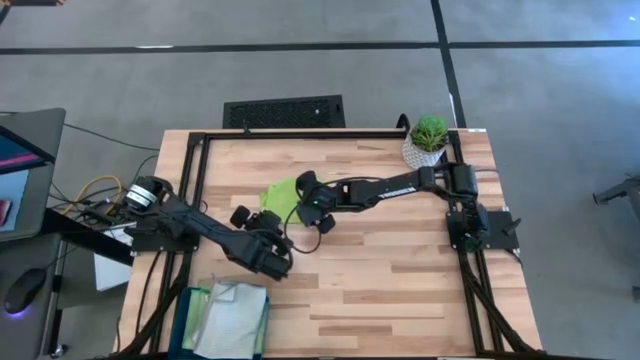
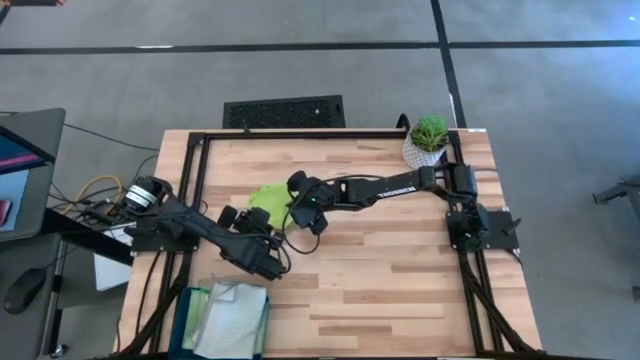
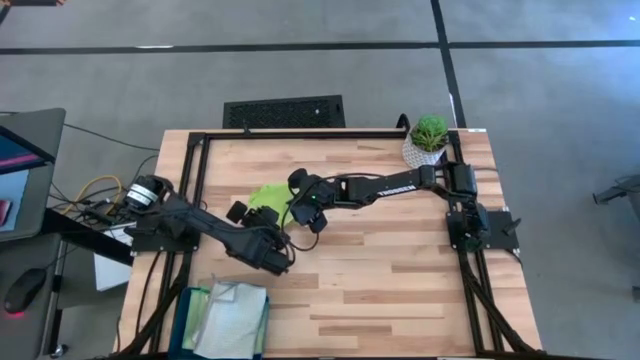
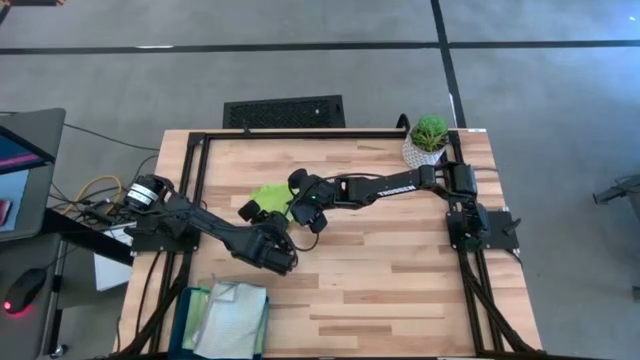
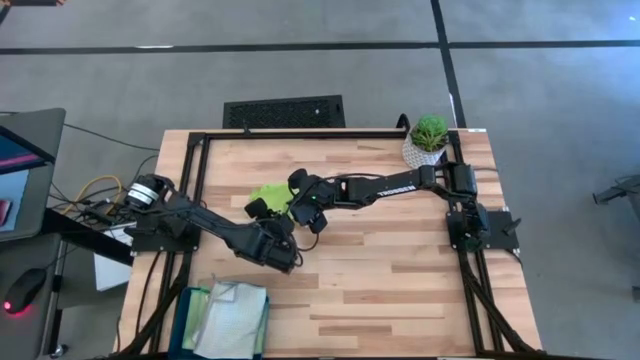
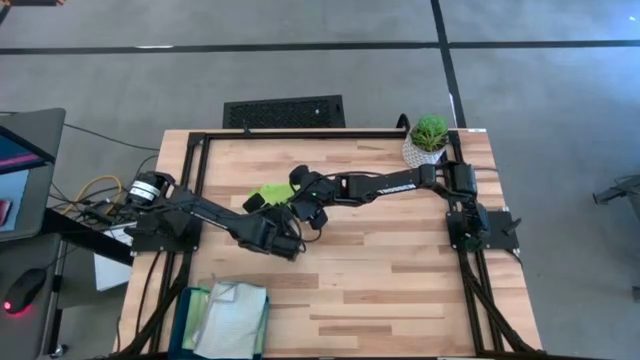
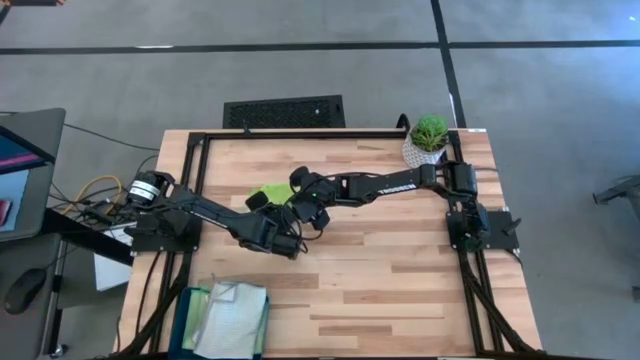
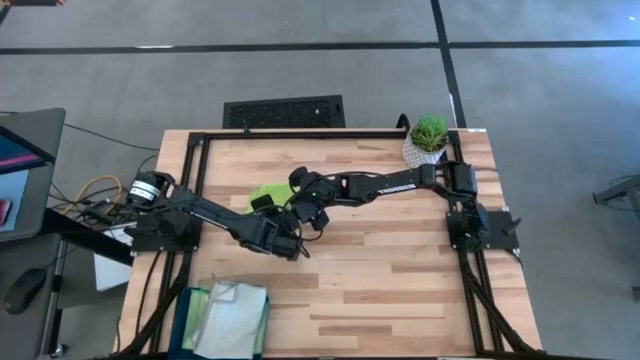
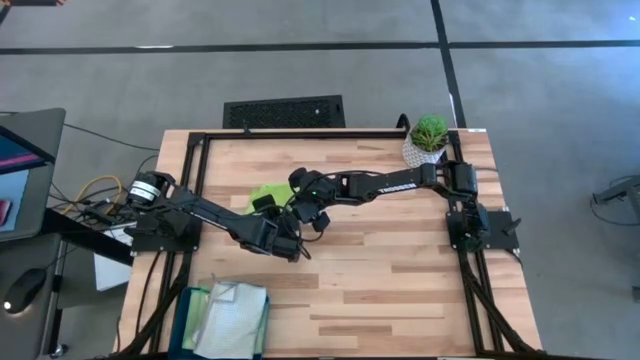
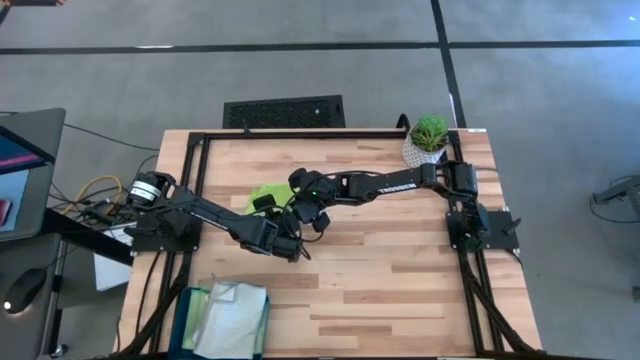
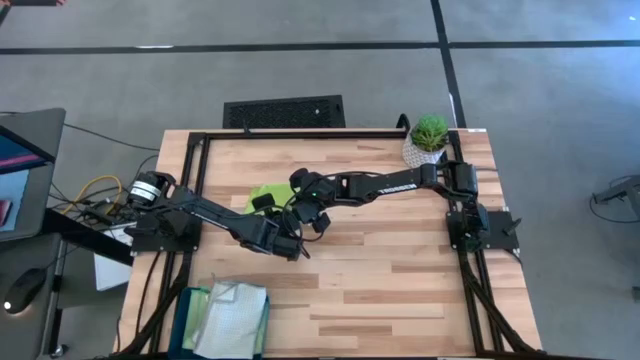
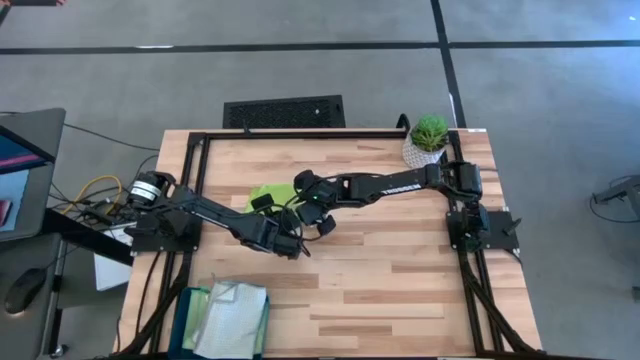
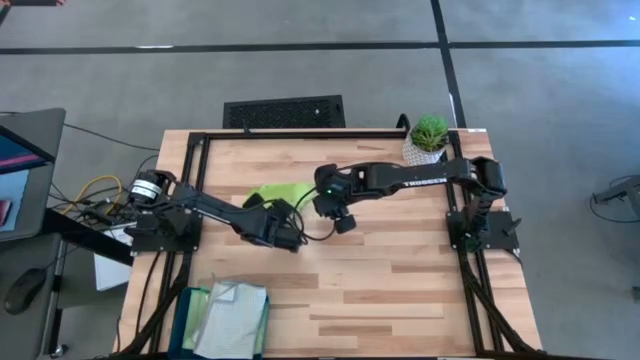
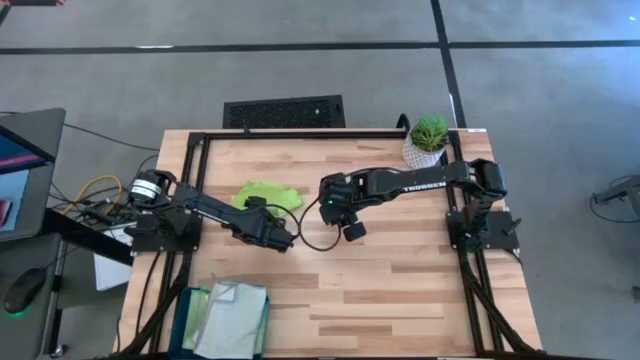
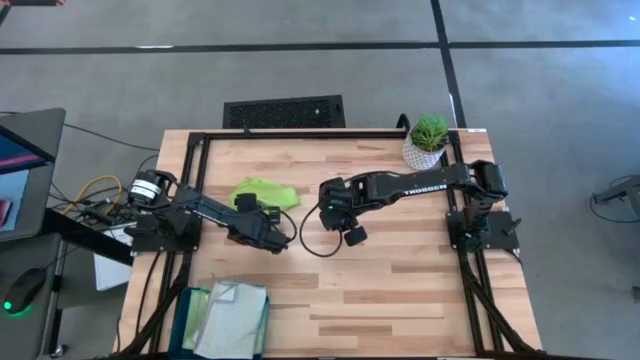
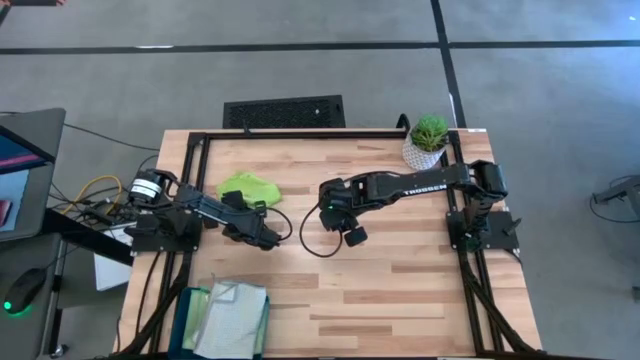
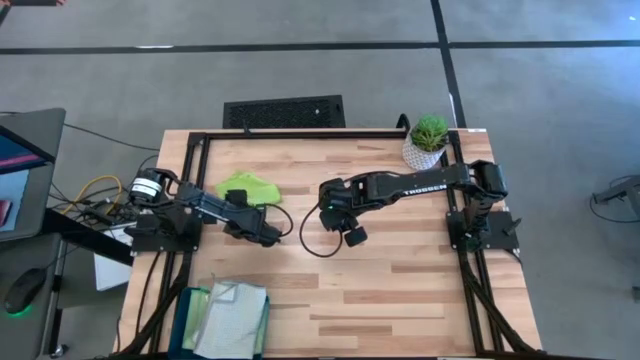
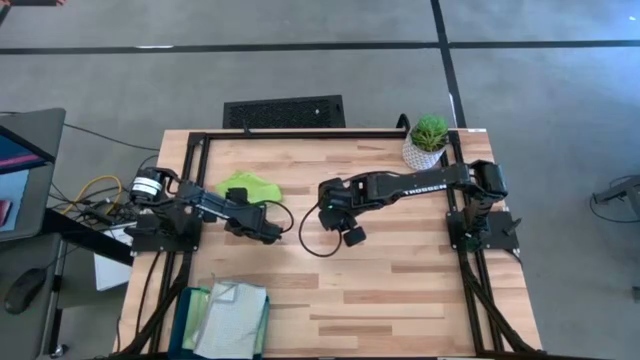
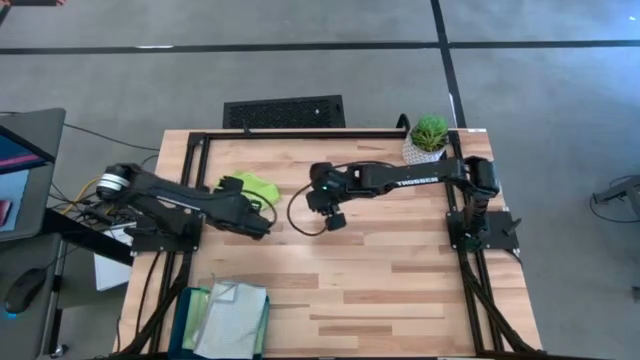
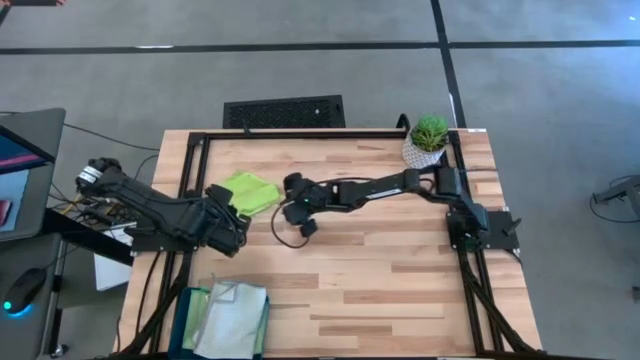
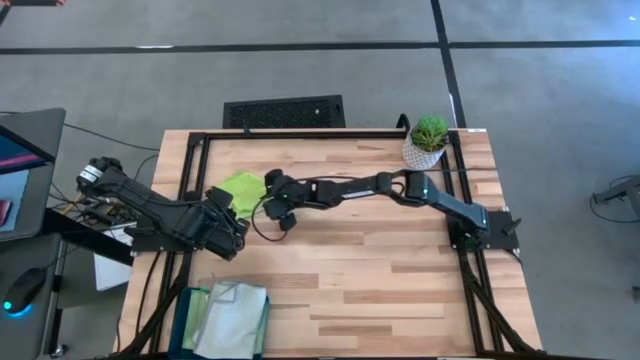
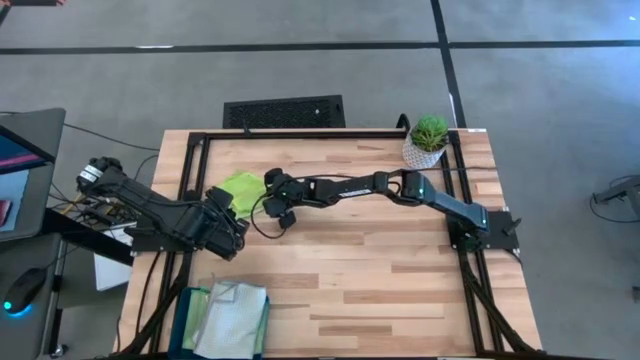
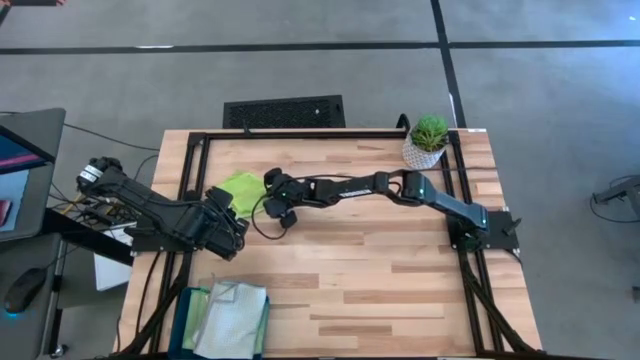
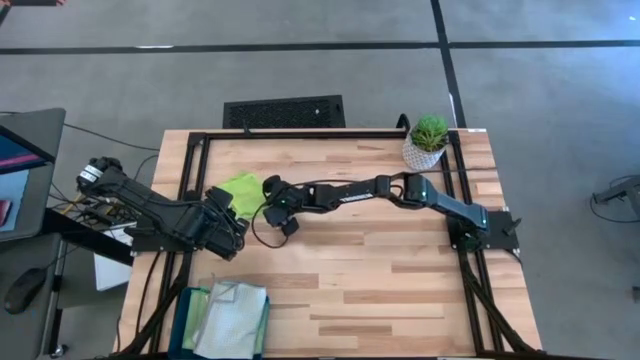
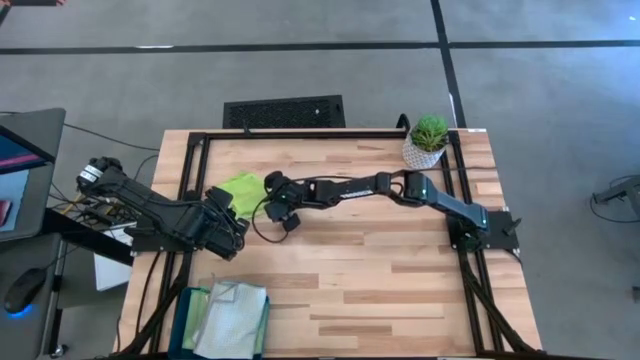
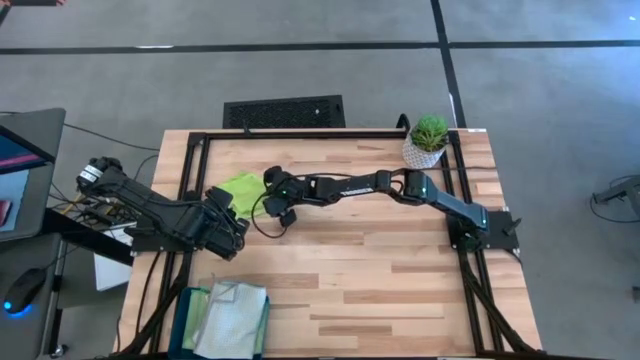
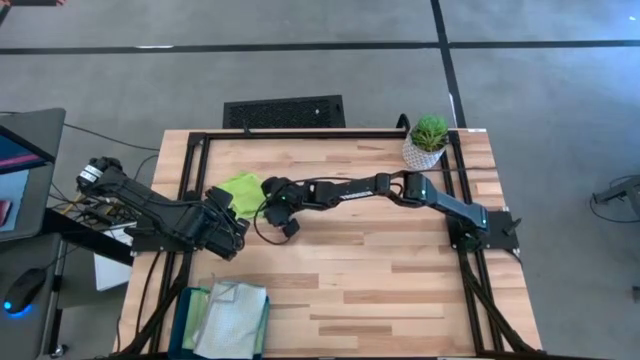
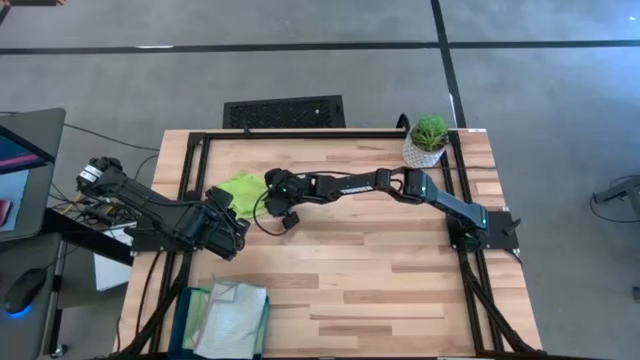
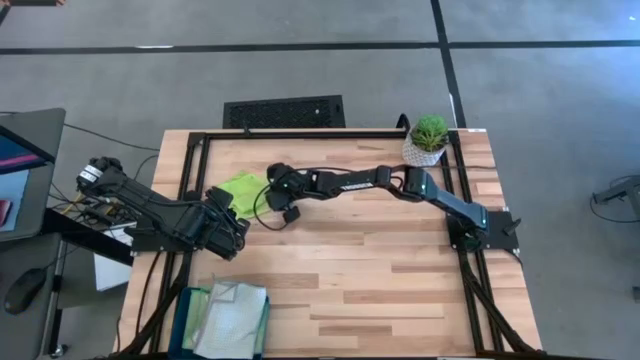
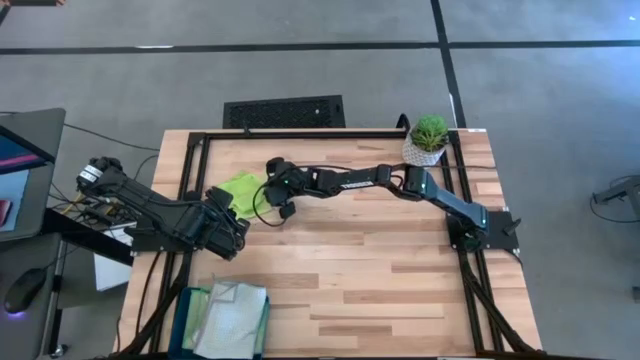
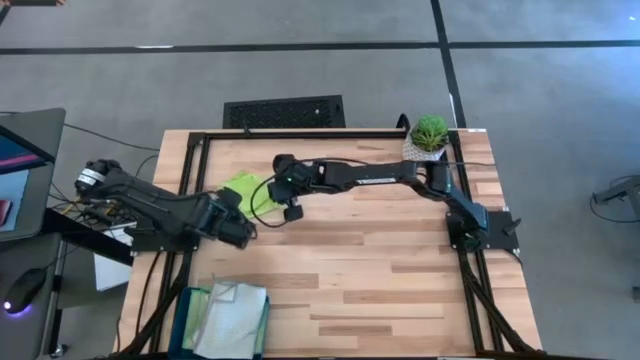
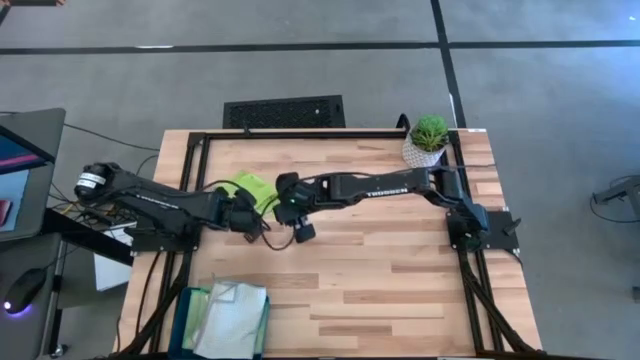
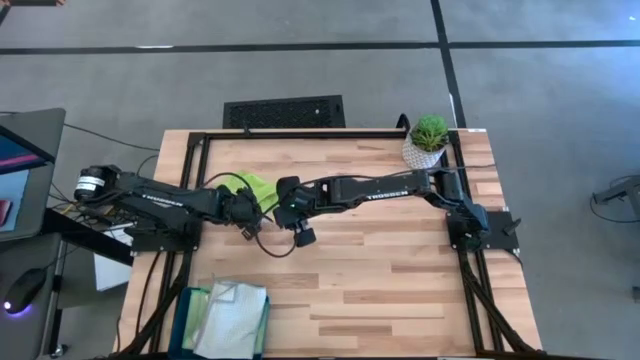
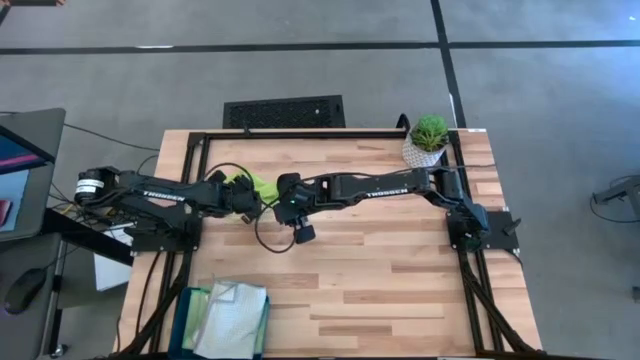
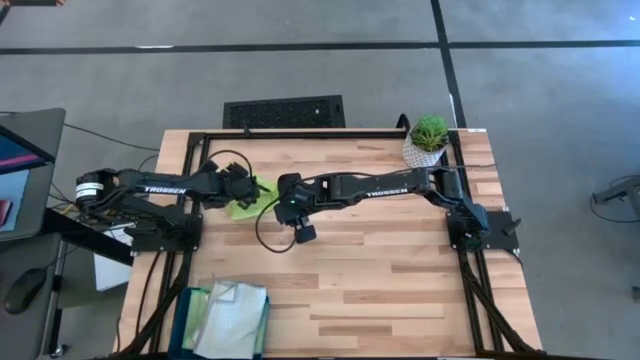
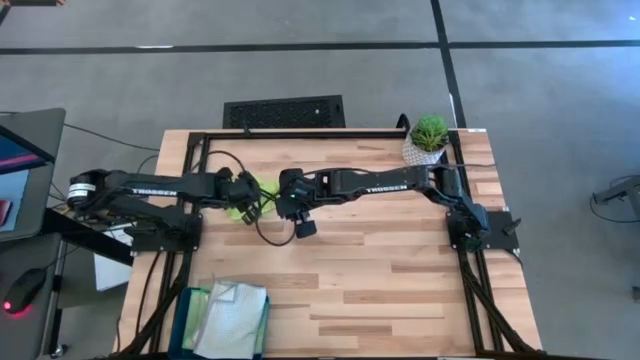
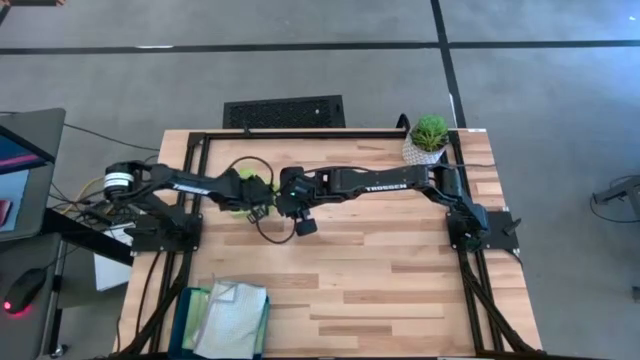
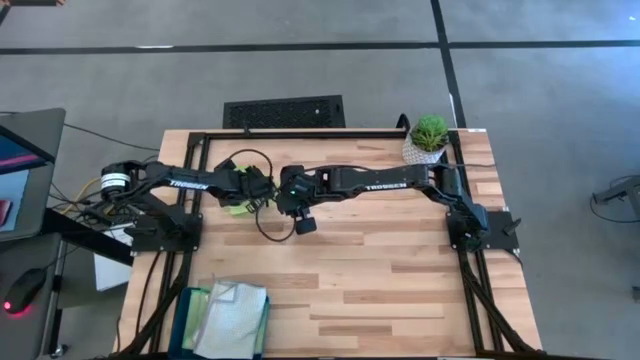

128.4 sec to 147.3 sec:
Task: Fold microfiber towels
Fold the green microfiber cloth

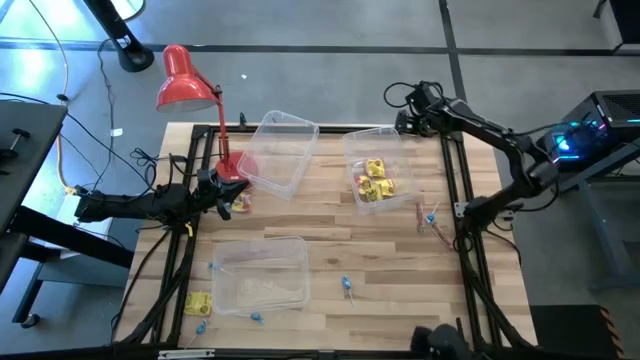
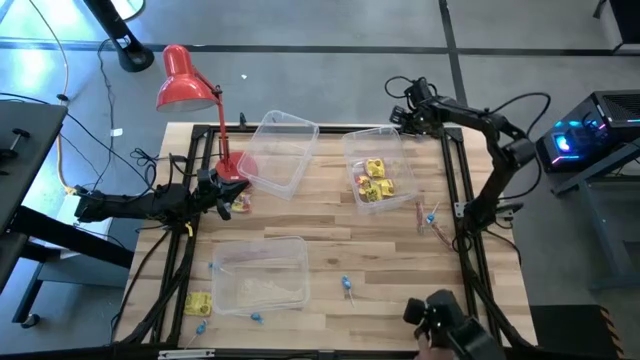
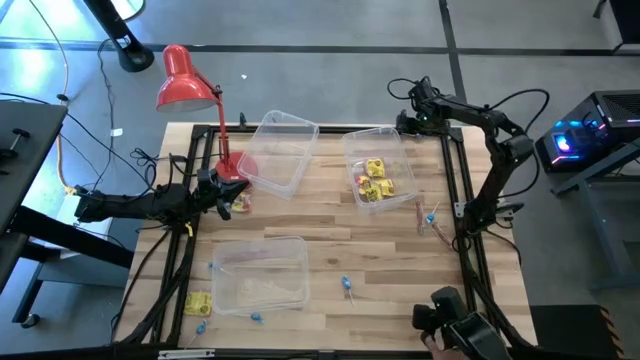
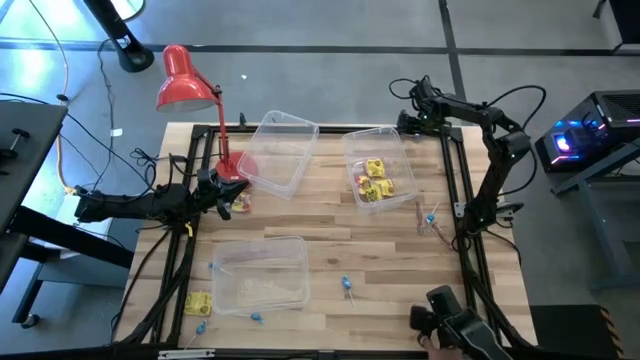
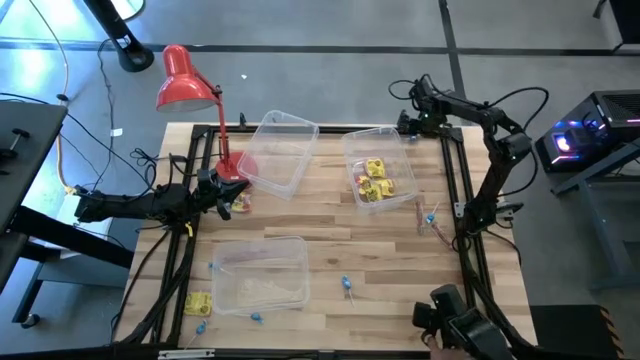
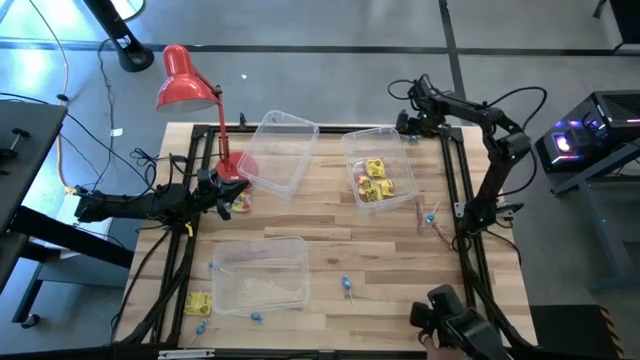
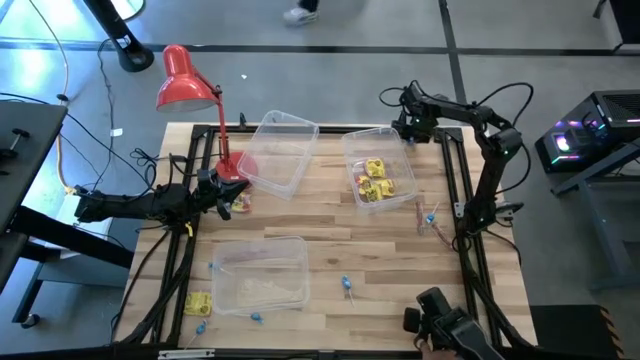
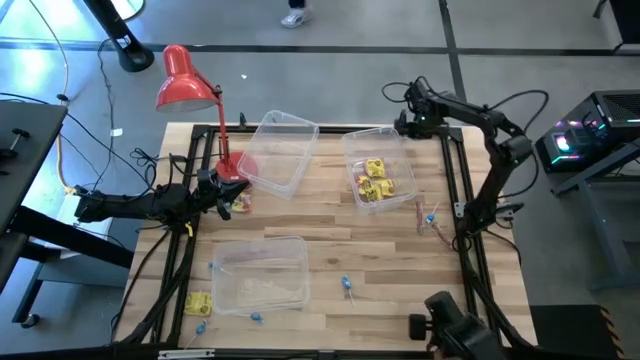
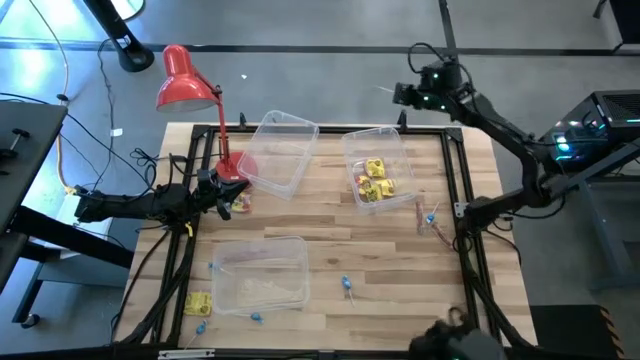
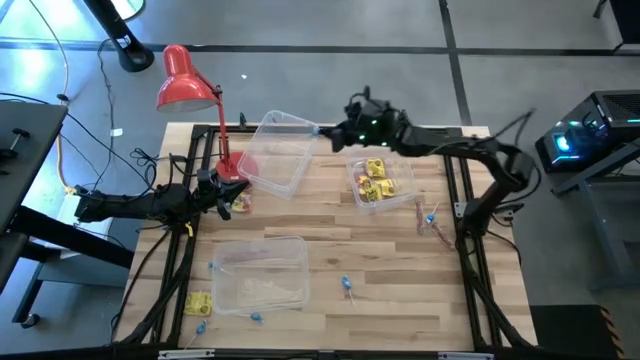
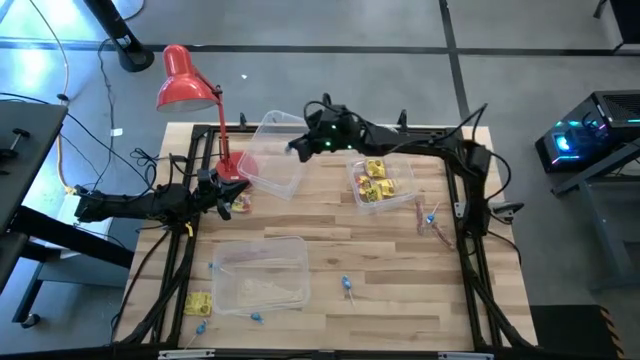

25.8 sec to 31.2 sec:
Task: Sort candy
Put the blue lollipop into the top left transparent bin
